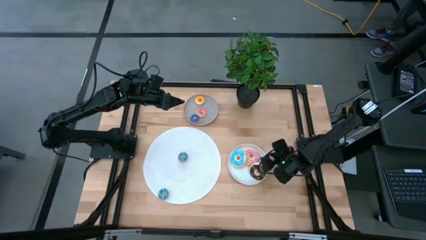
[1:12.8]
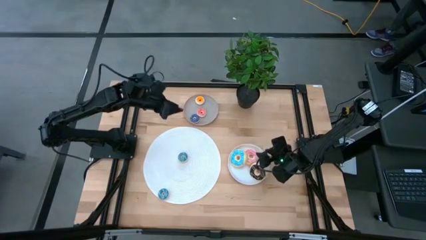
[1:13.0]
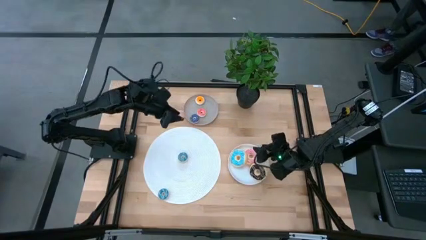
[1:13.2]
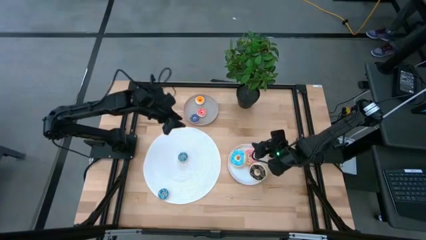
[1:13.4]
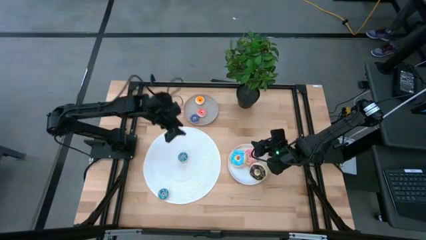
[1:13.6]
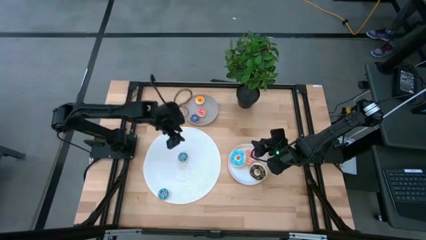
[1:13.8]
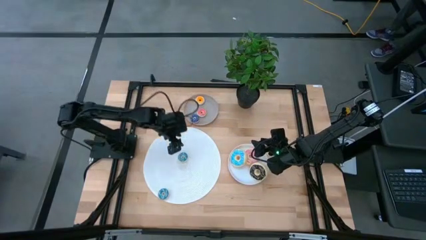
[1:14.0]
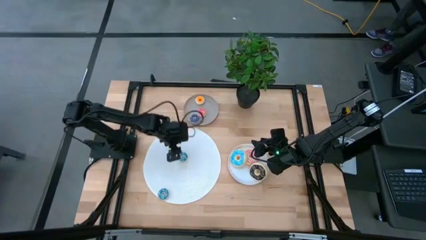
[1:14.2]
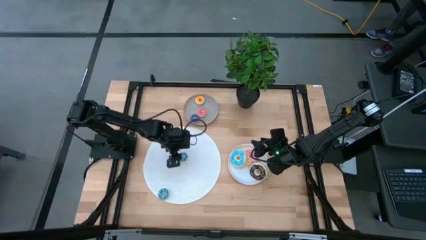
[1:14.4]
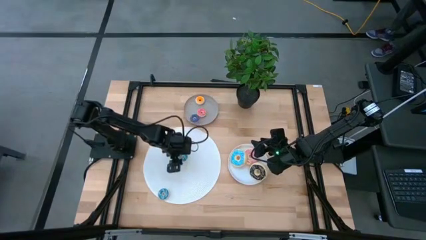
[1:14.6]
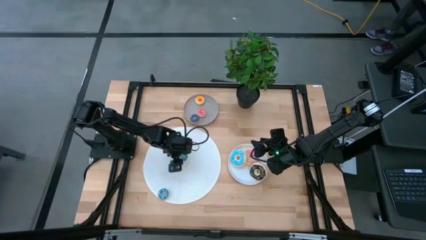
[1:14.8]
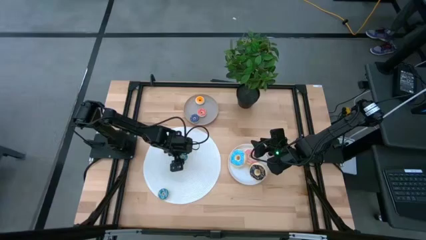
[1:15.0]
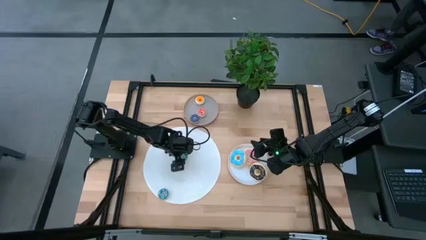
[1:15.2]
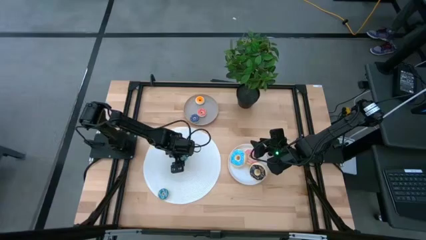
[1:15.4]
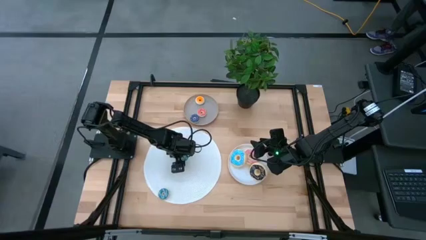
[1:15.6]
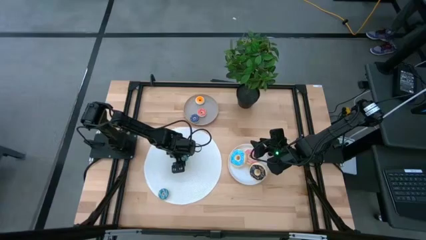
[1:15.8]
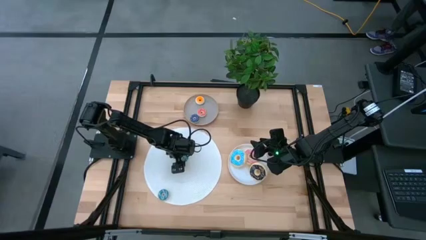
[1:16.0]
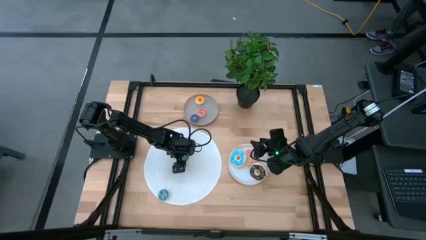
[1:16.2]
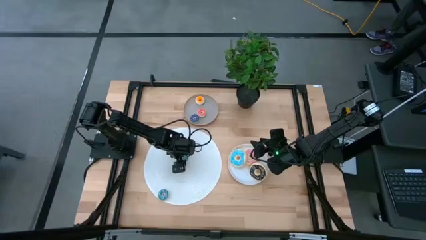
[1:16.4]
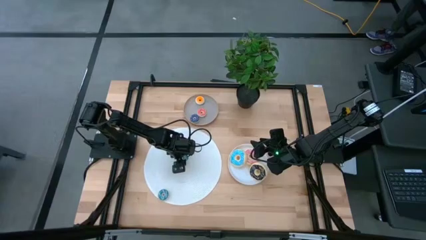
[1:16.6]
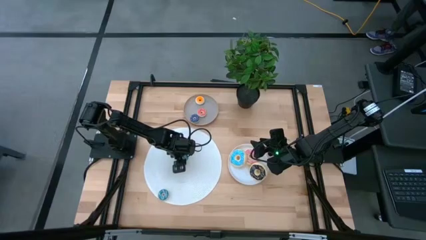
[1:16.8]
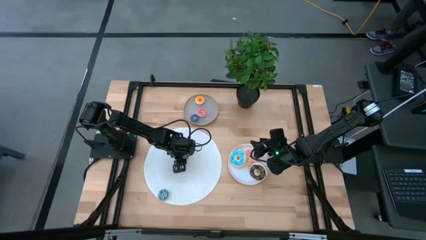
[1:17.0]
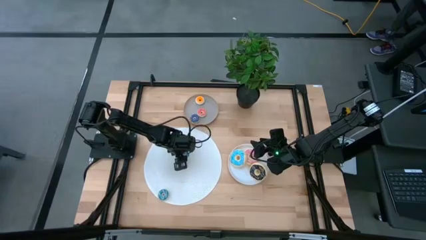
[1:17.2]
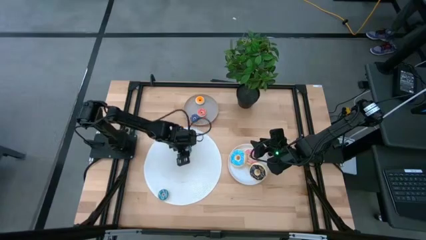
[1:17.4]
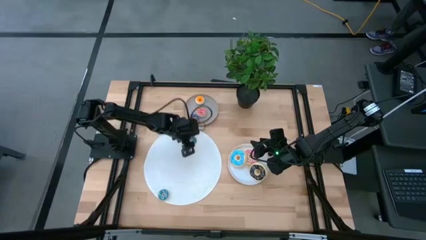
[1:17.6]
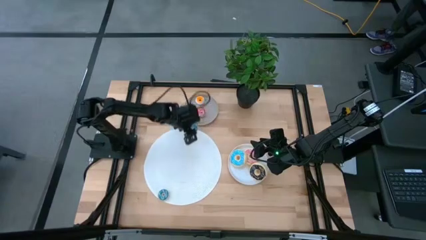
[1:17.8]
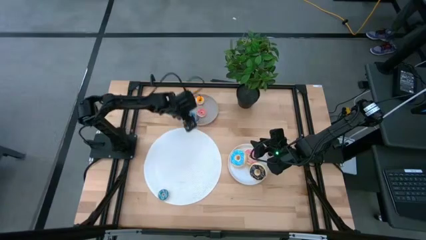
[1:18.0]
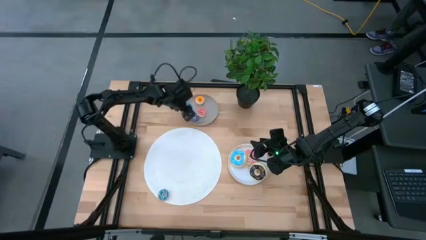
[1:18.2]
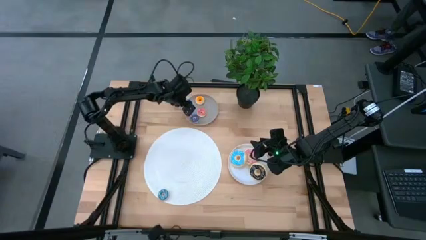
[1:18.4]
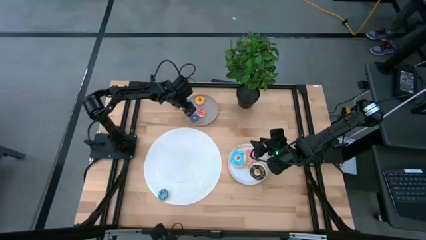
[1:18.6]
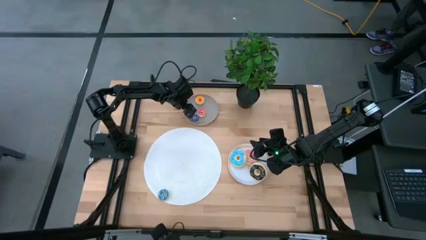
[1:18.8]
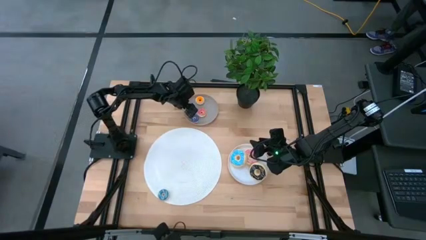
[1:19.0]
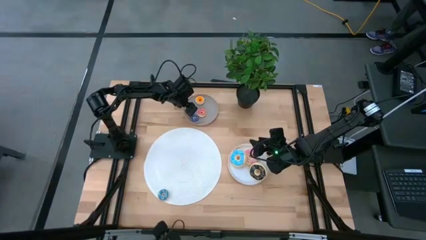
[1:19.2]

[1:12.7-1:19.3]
Task: Pick & Place donuts
Put the top small blue donut on the brown plate

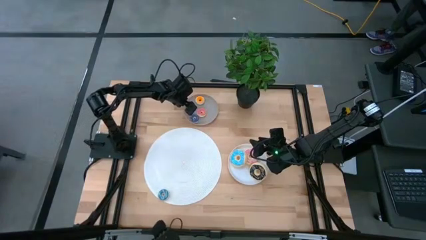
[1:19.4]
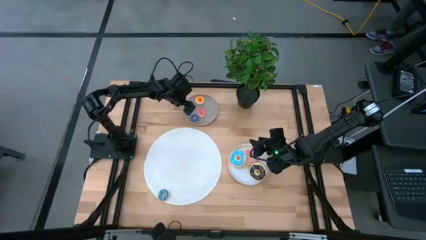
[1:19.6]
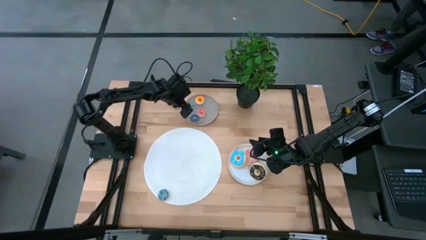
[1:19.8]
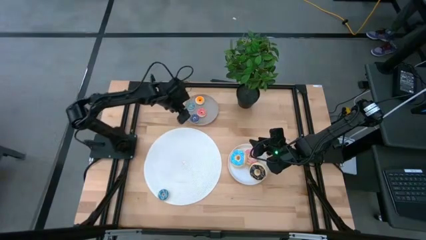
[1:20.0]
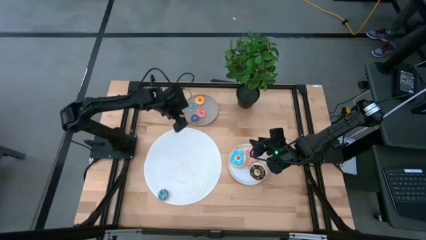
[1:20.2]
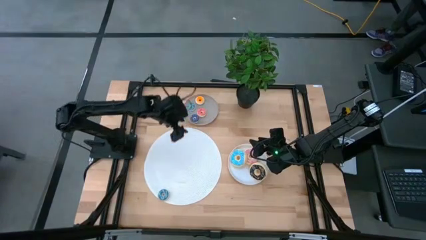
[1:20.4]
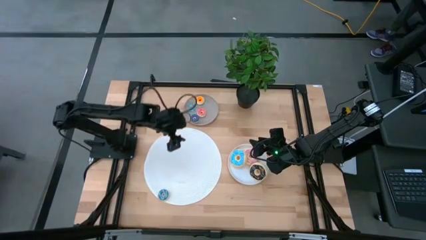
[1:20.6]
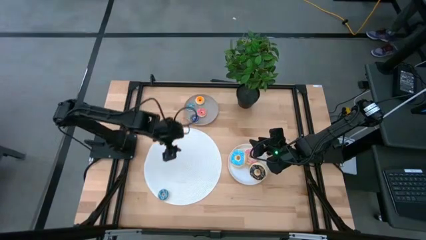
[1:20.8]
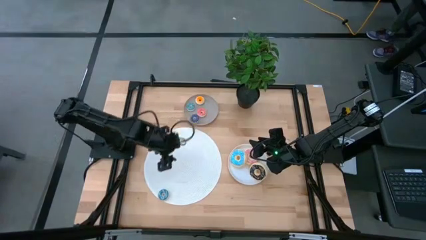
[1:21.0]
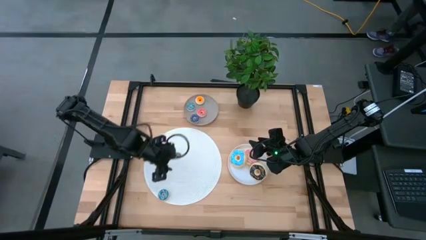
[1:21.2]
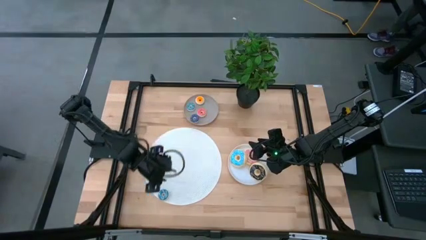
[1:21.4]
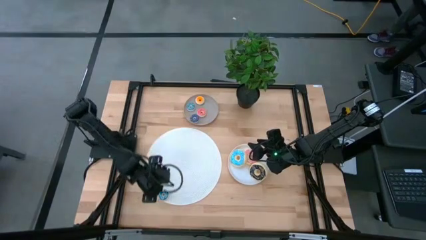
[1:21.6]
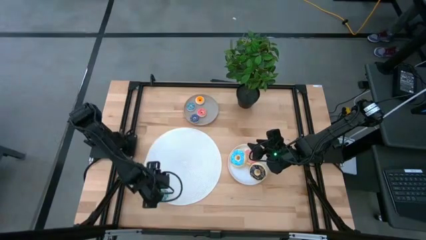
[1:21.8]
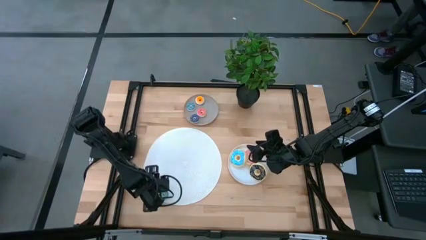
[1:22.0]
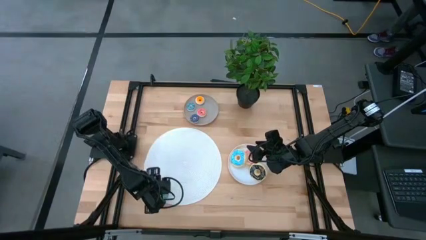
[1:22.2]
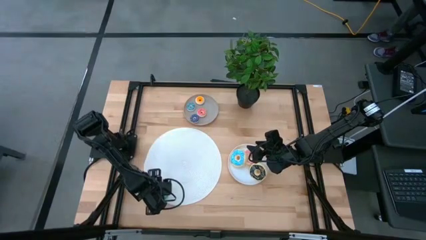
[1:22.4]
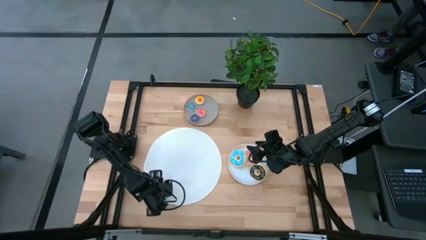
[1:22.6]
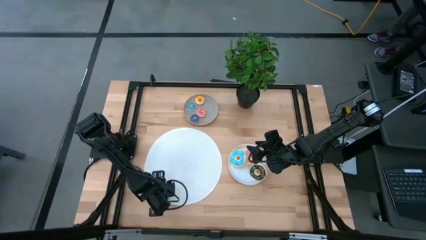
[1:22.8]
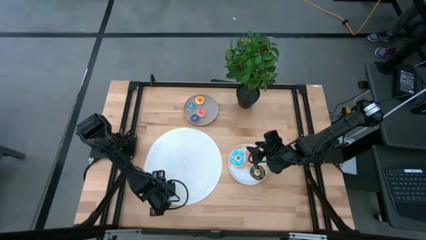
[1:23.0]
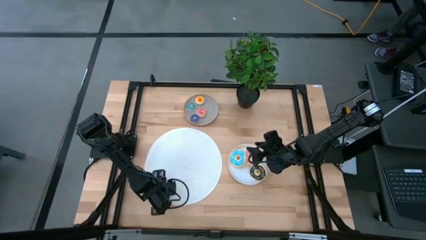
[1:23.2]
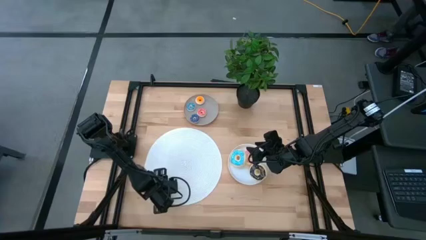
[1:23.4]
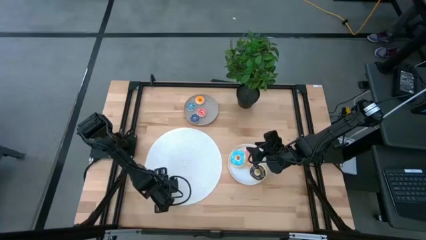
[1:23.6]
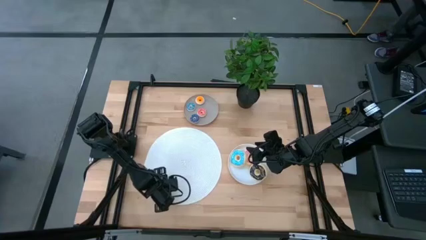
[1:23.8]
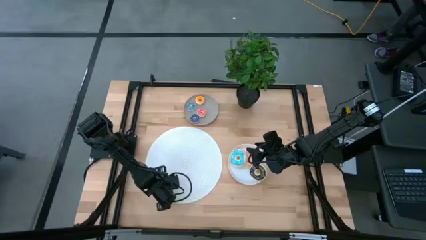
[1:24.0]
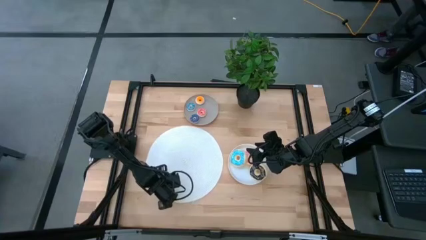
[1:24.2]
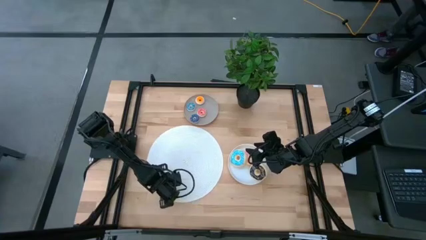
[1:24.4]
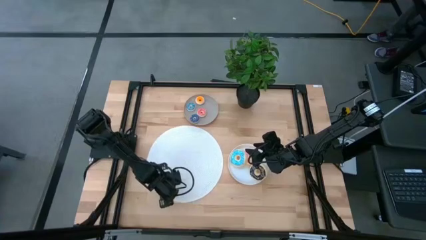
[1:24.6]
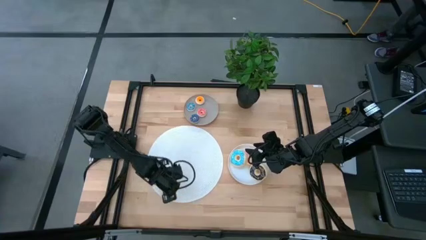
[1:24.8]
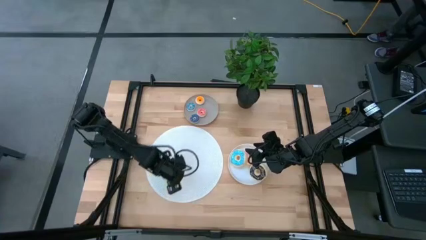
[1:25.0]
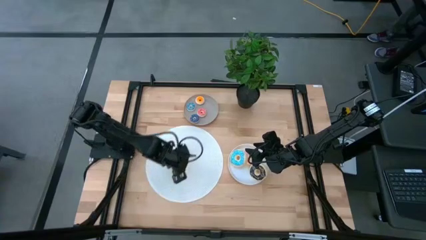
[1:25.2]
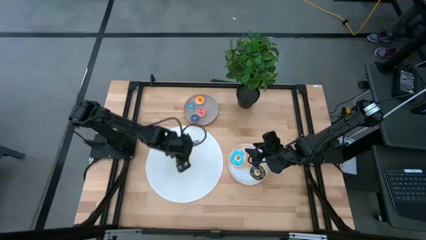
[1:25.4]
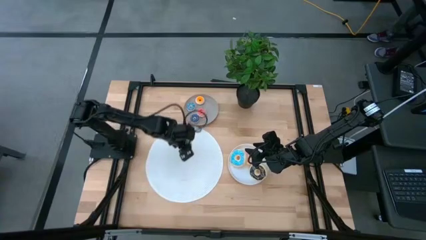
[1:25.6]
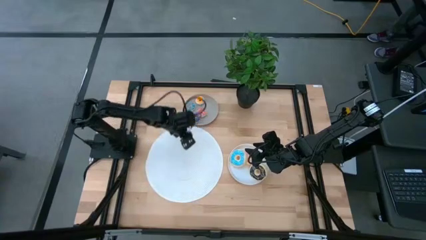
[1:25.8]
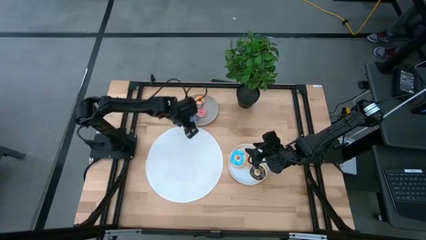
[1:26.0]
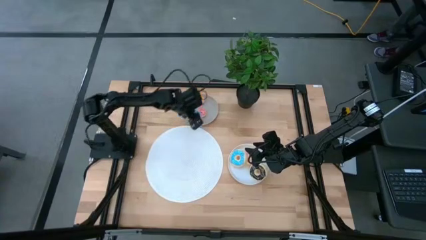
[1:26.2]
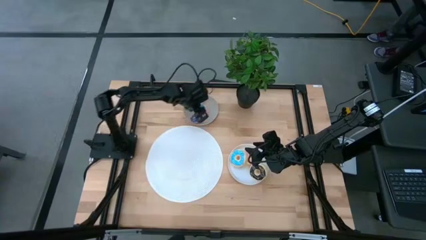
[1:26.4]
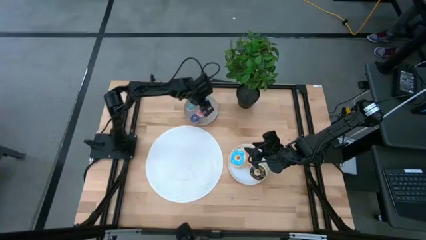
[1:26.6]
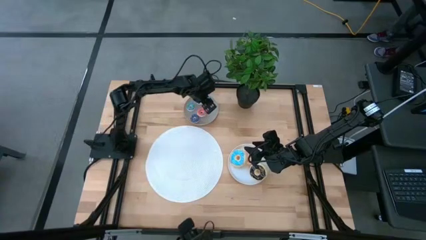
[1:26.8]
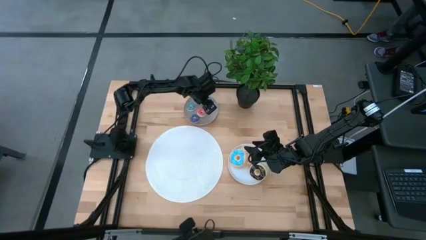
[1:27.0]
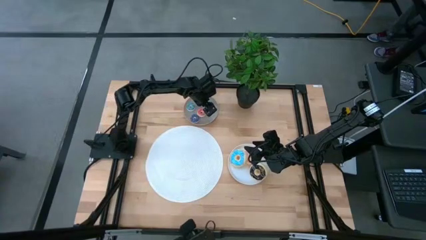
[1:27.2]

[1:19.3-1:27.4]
Put the small blue donut on the brown plate

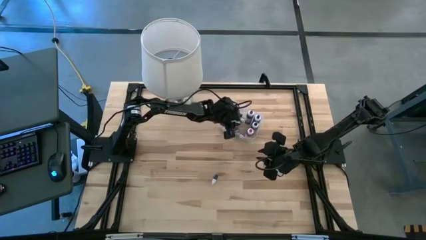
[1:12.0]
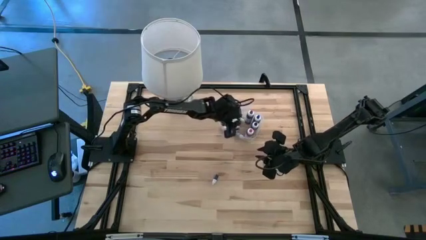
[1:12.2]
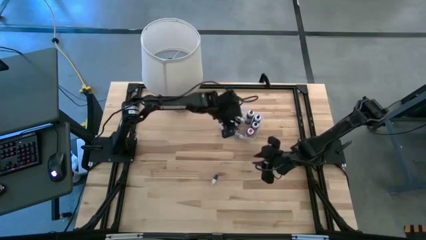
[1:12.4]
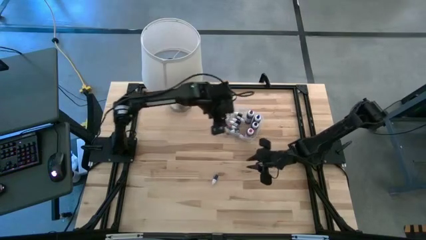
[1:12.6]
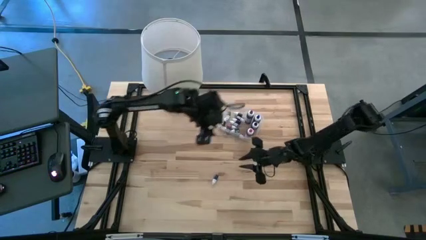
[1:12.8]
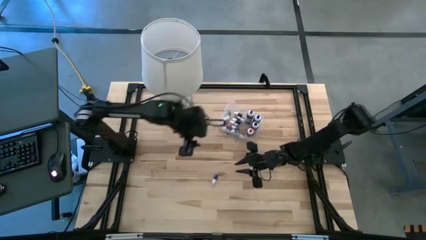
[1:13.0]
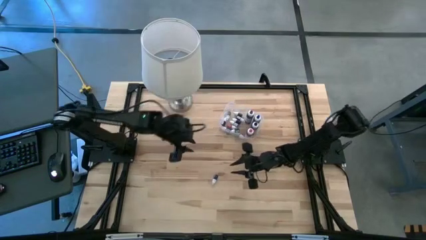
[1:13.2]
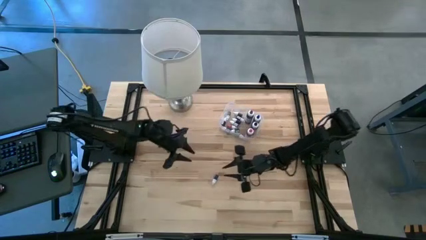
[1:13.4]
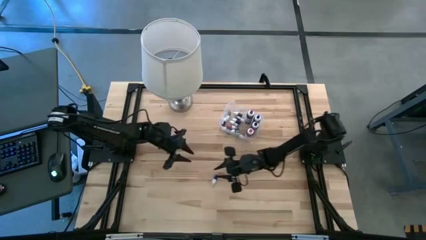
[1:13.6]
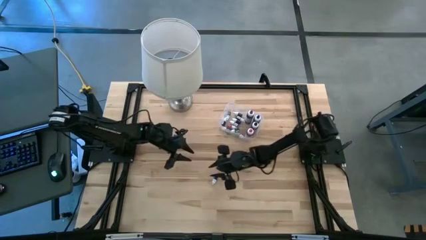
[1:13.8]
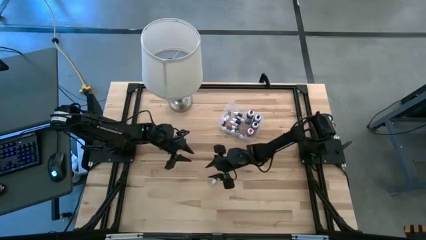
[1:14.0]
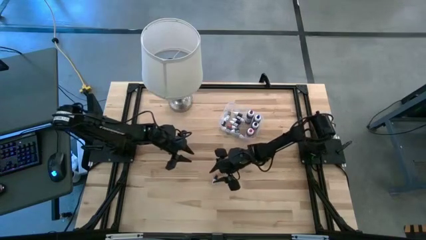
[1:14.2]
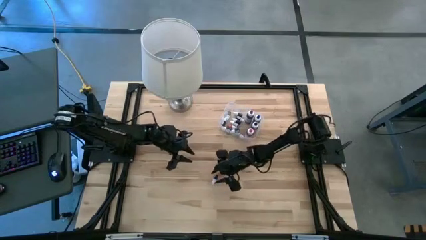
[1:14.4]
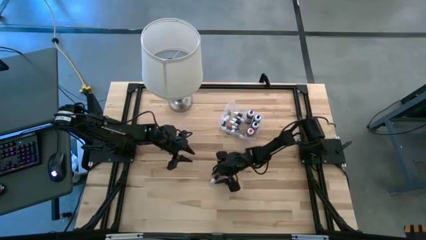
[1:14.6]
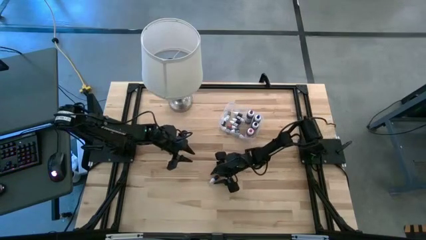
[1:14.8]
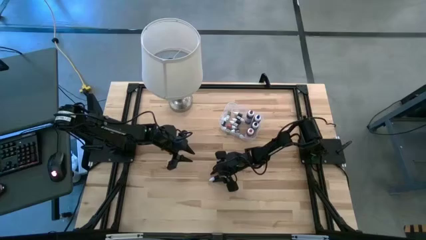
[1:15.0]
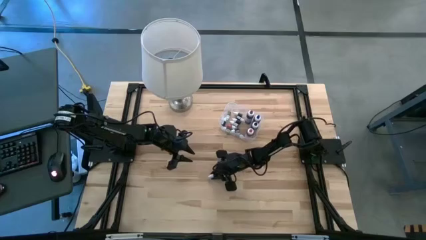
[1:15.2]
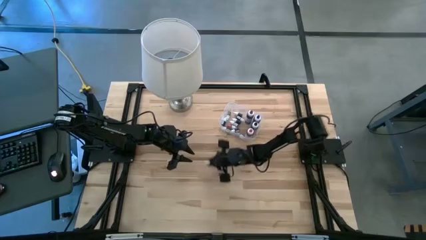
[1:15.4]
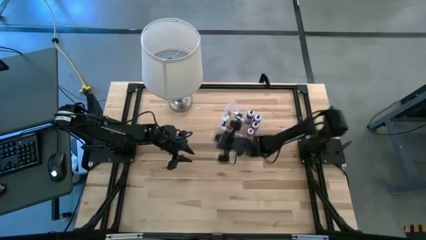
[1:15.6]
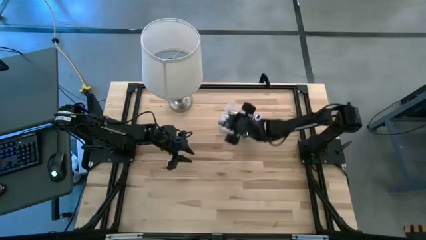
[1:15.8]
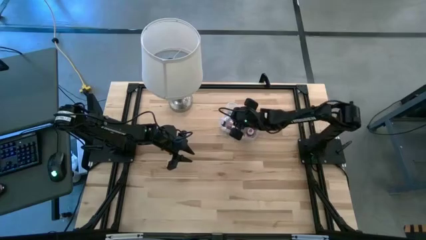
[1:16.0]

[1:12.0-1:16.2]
Task: Pick & Place food coloring
Put the small blue food coloring bottle into the transparent bin
